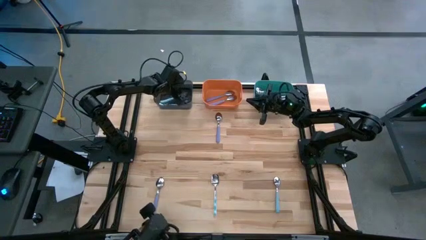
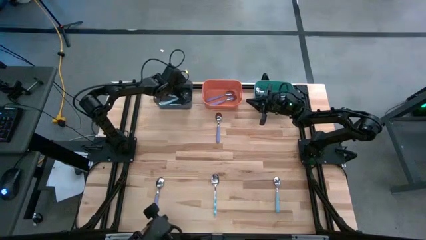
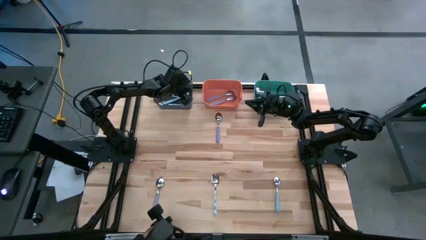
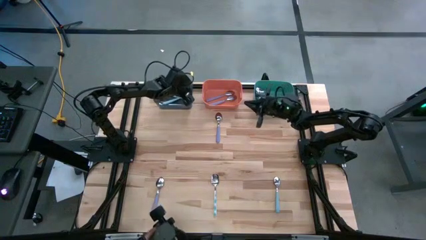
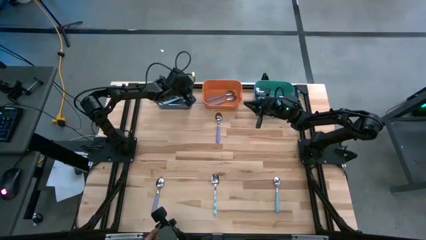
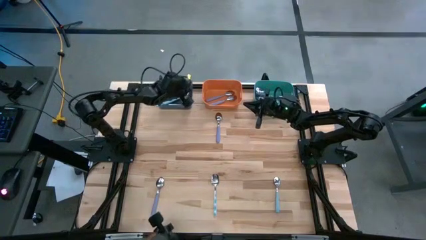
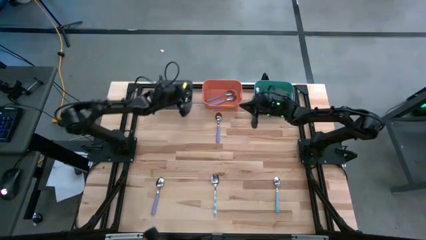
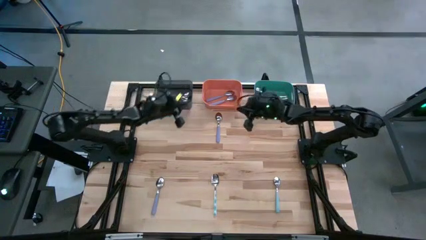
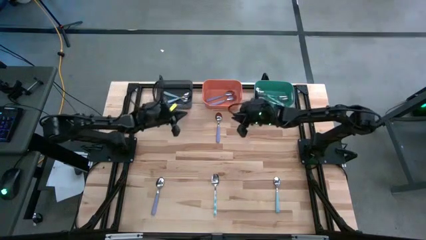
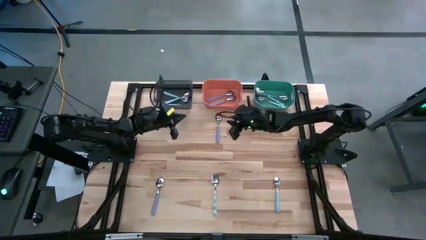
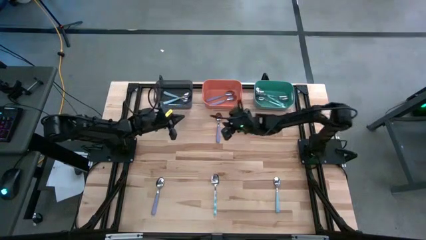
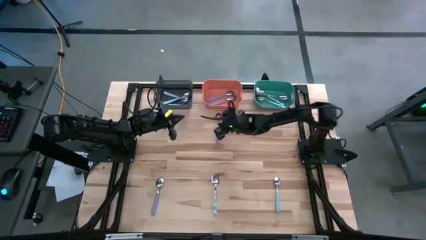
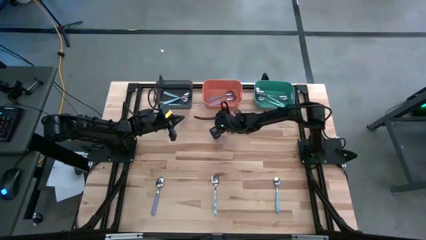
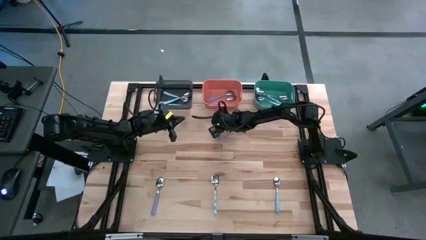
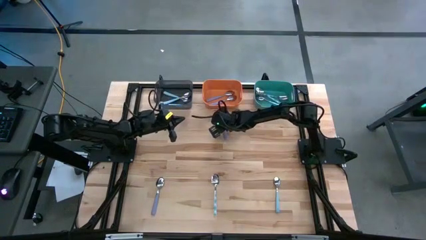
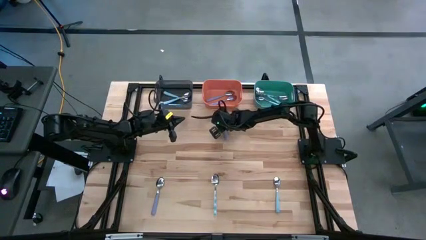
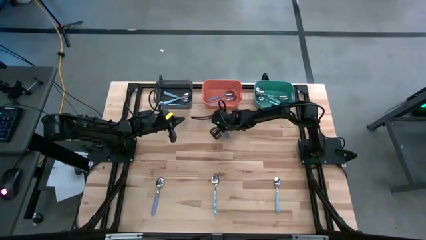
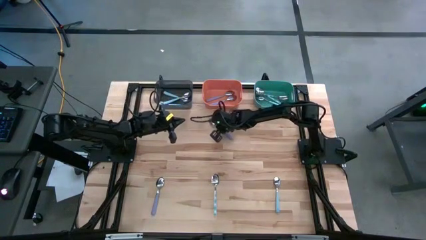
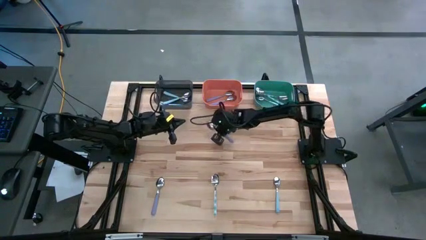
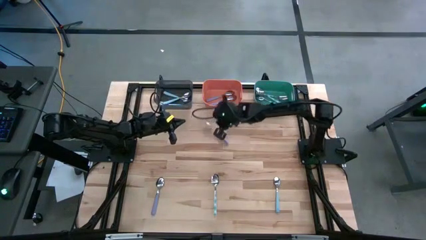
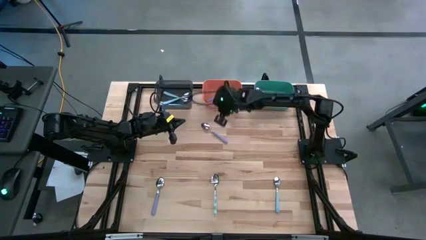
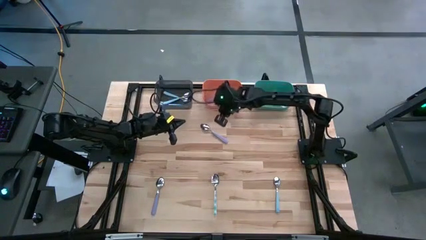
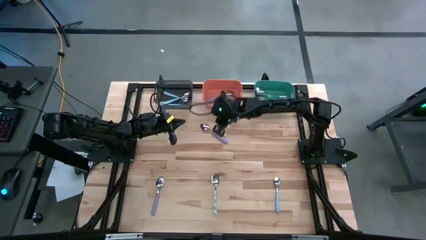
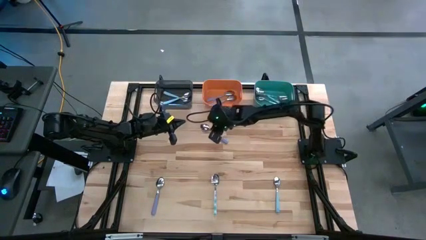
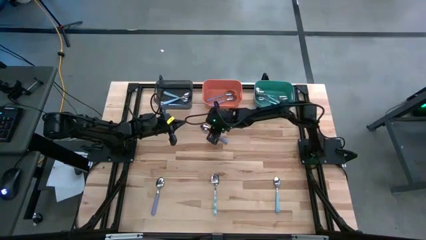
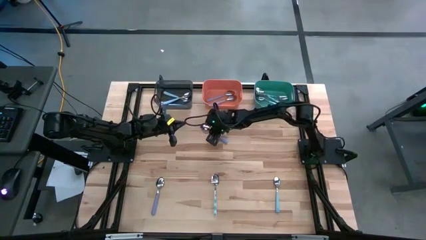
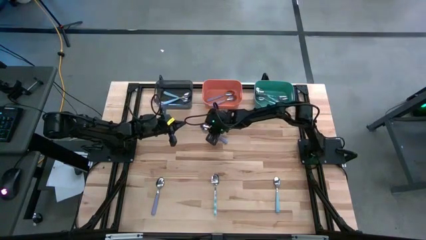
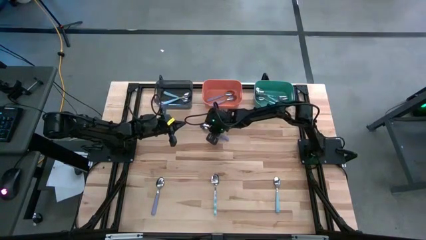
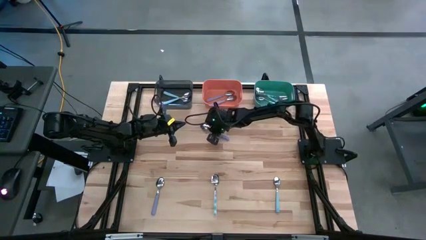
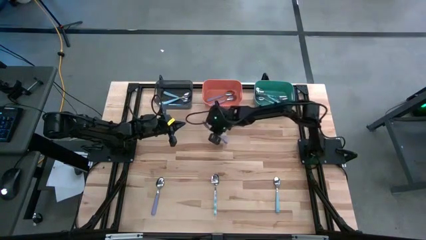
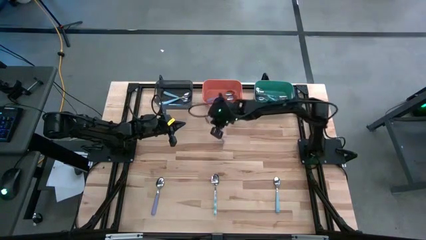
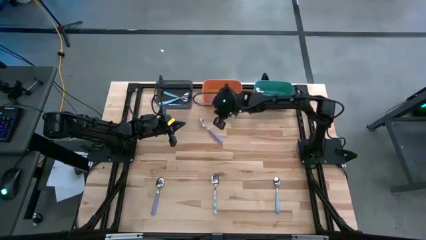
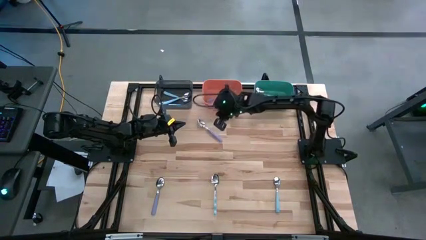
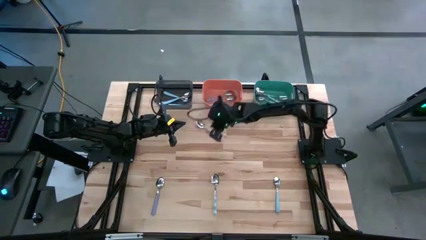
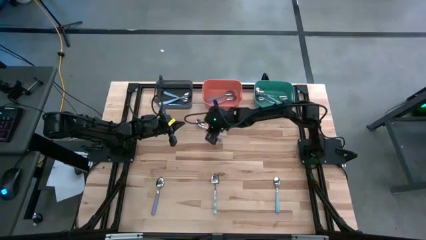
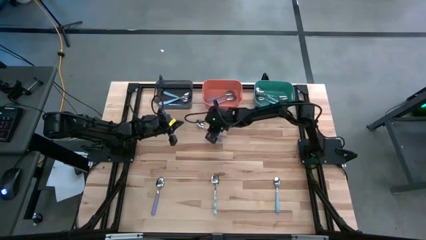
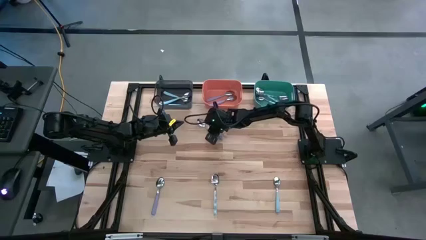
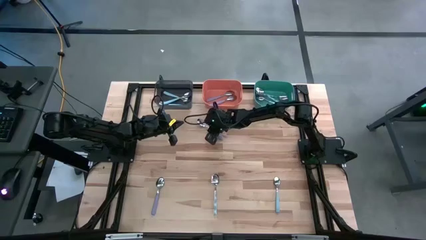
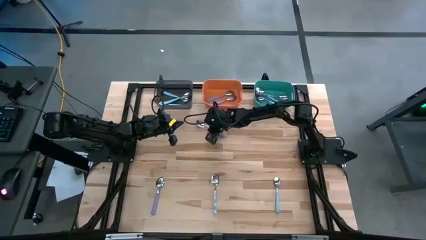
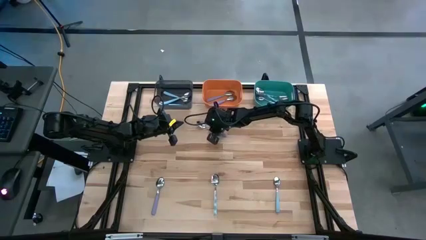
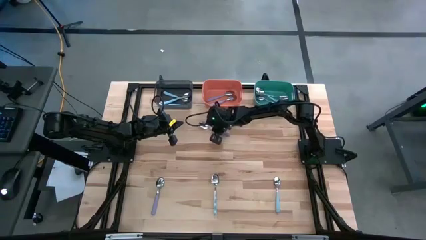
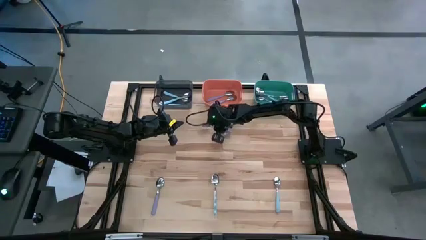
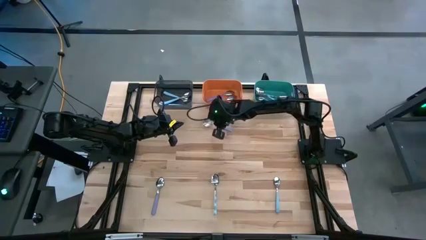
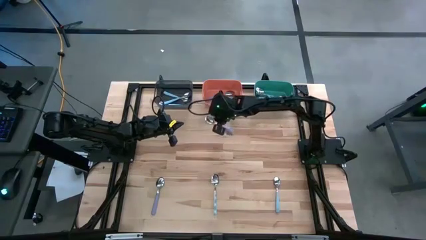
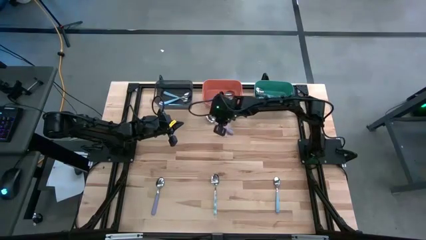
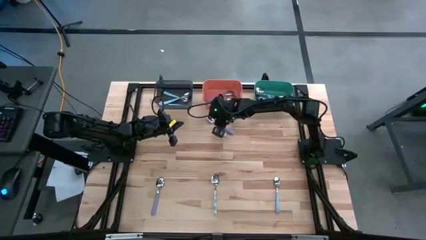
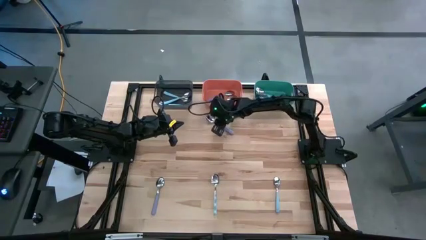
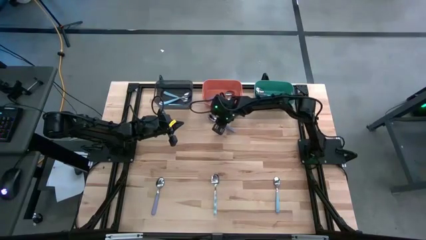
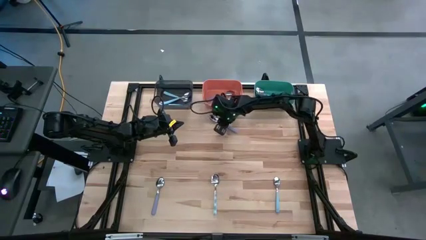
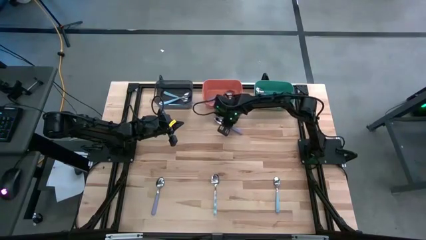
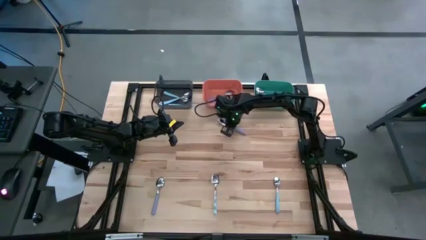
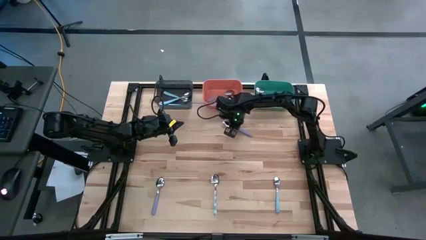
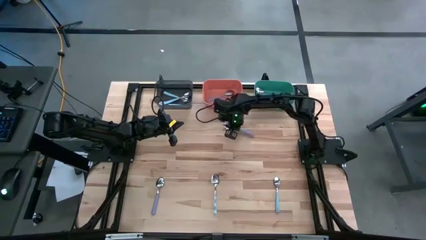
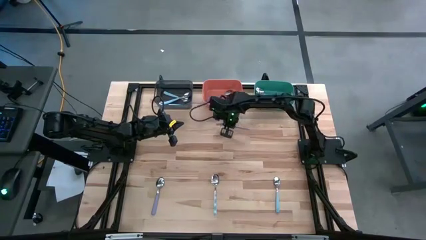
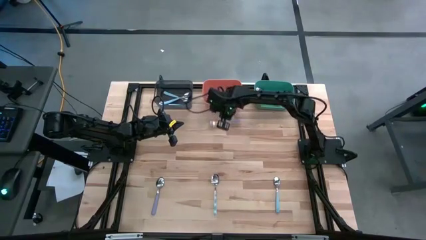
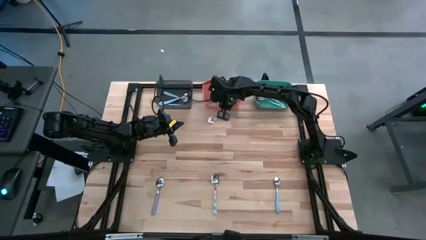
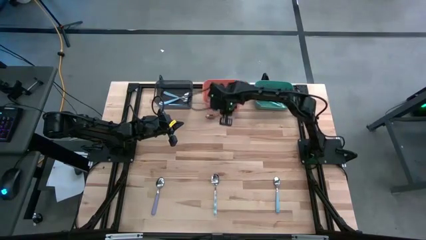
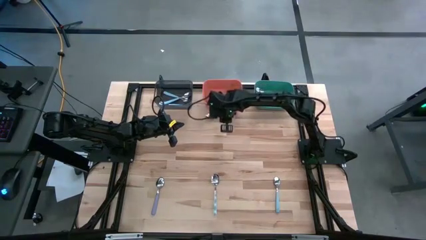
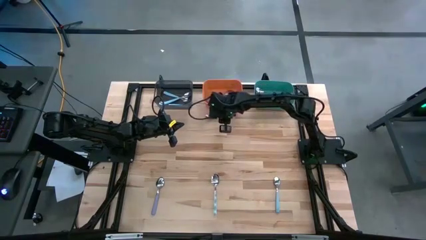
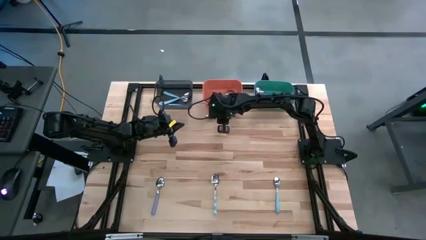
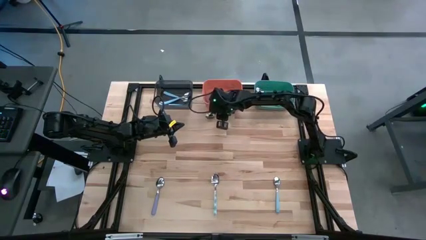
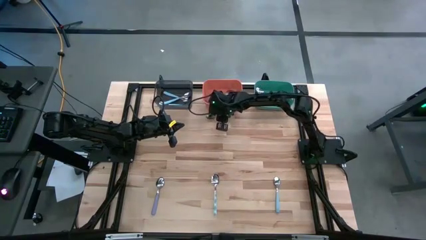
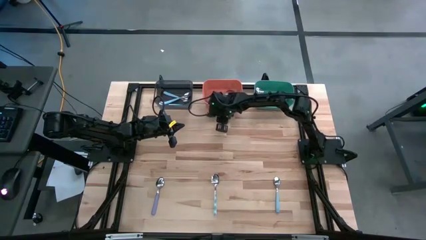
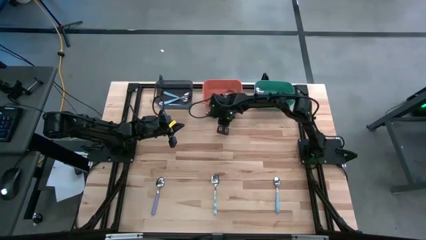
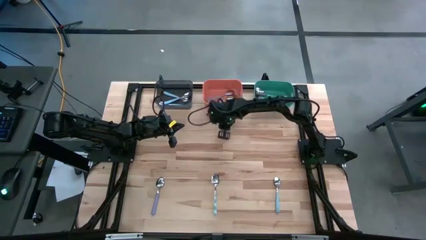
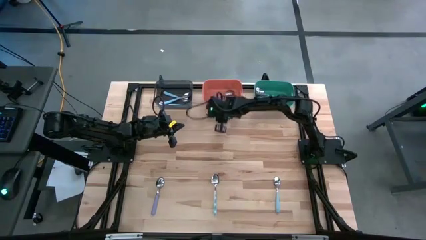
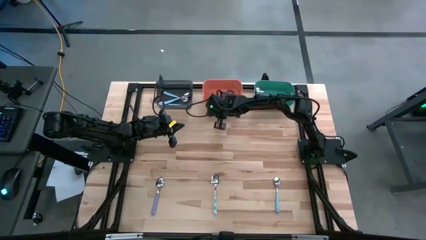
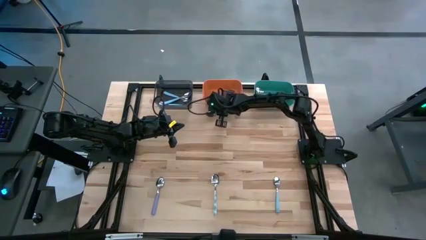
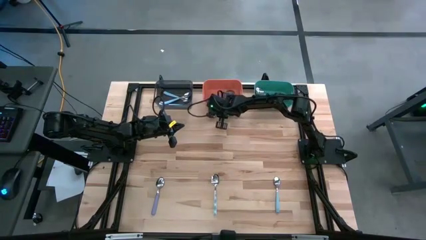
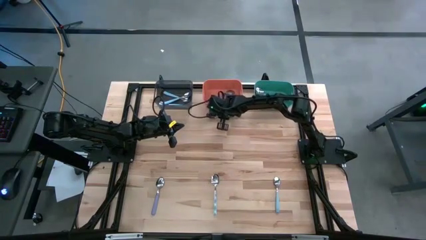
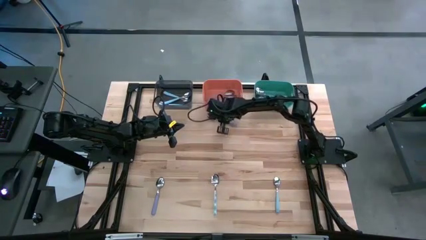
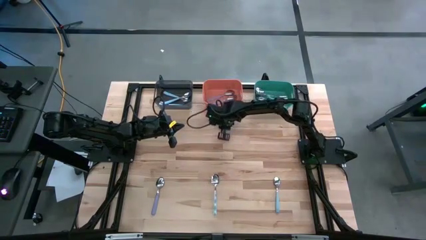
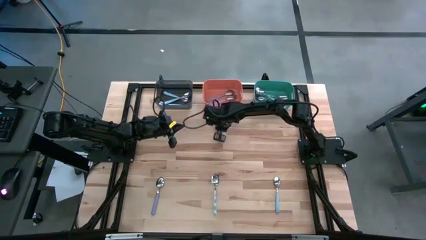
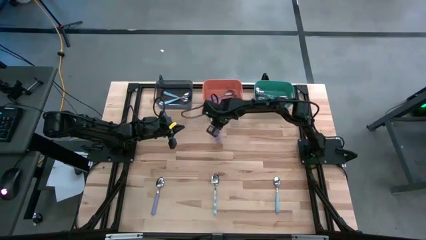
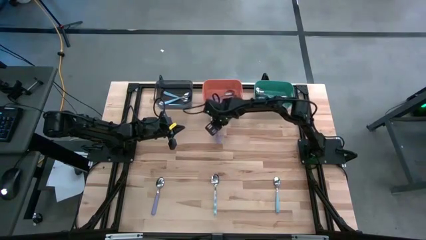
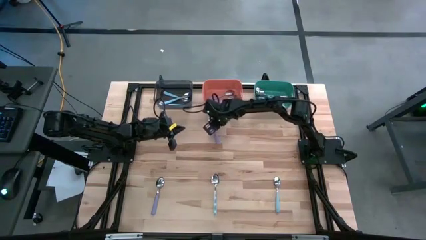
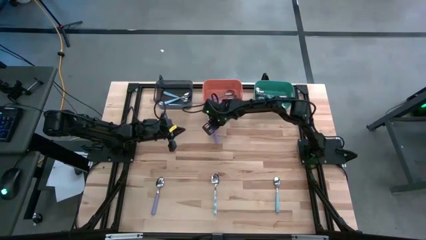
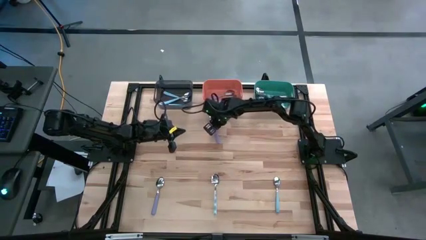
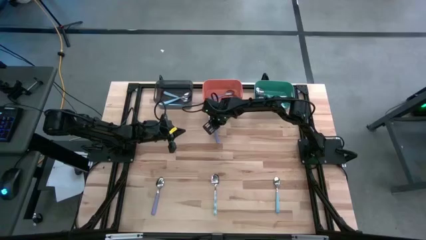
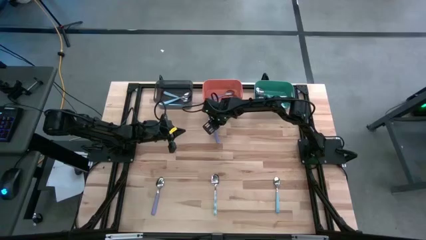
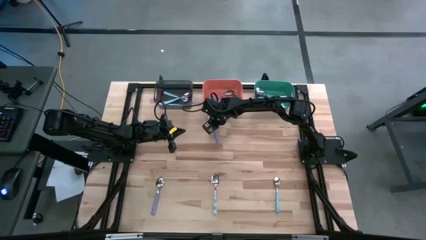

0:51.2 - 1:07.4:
Task: Sort silverware by color (type)
Put the purple spoon into the orange bin

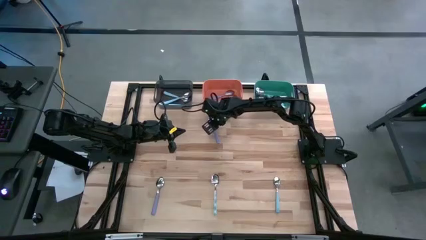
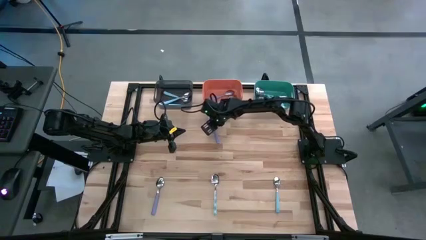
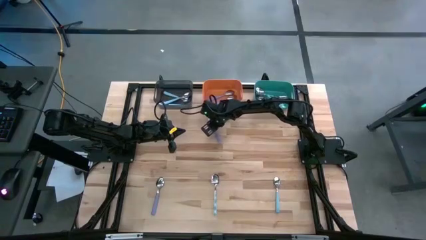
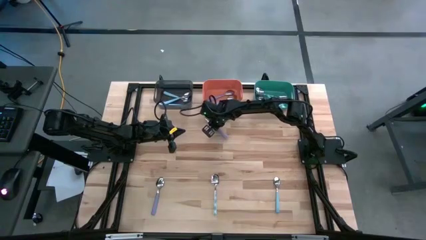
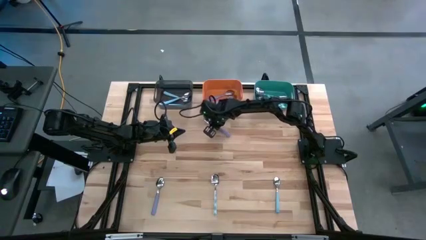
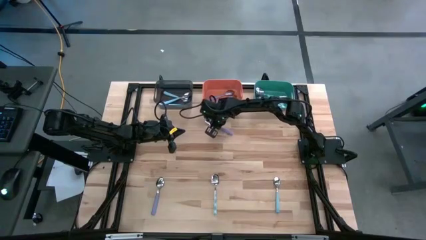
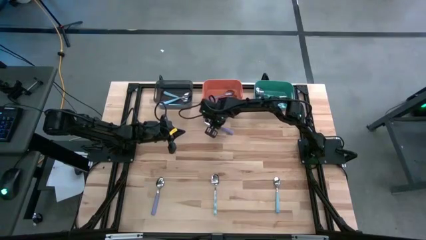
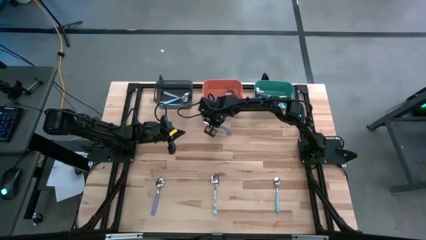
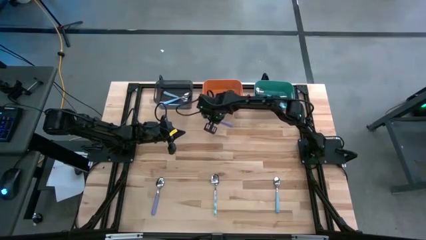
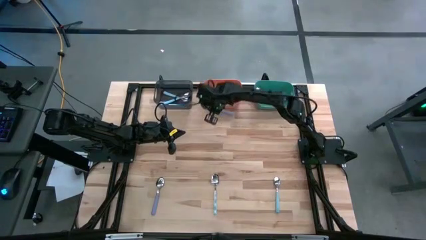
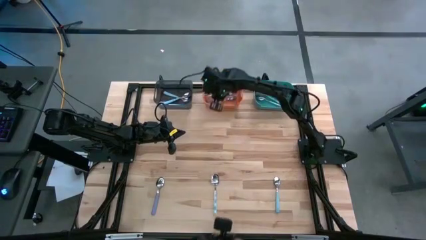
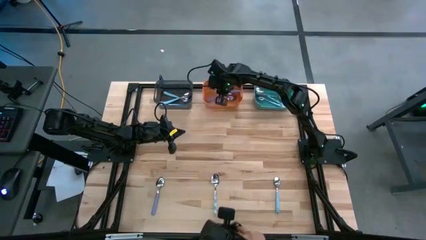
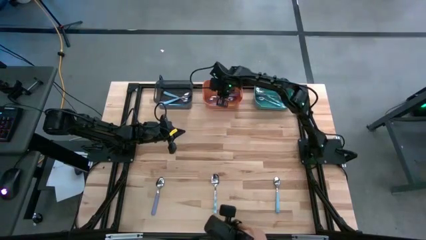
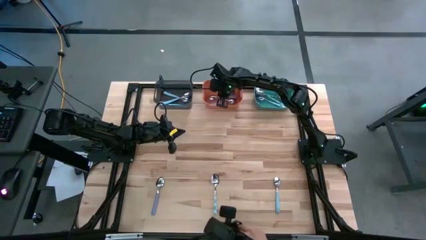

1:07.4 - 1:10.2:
Put the purple spoon into the orange bin
